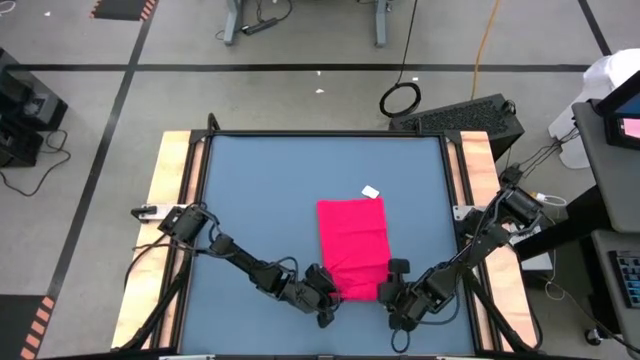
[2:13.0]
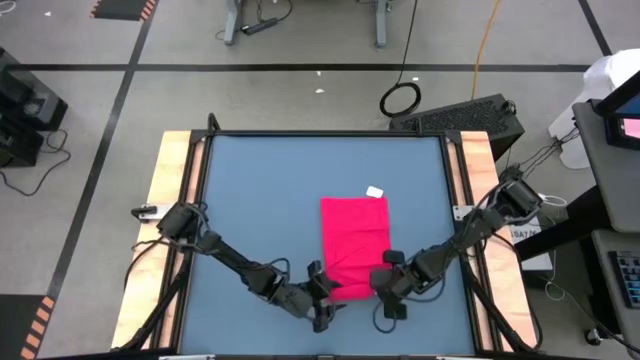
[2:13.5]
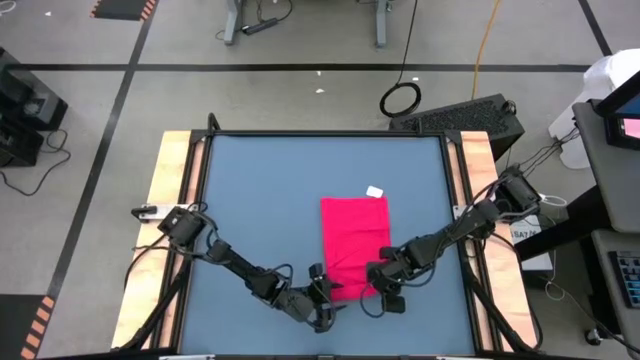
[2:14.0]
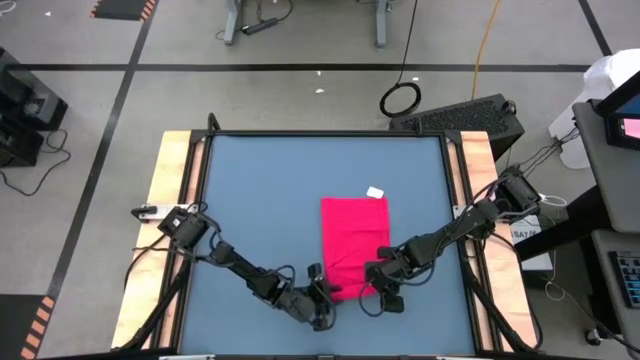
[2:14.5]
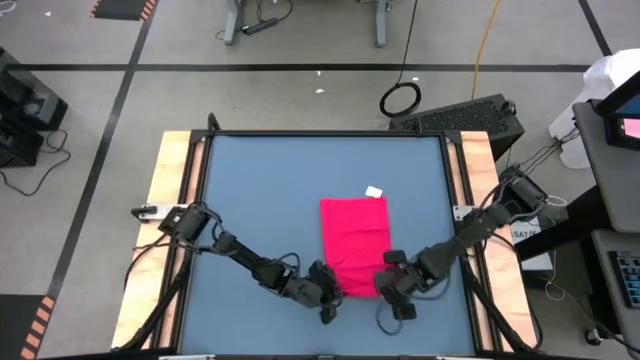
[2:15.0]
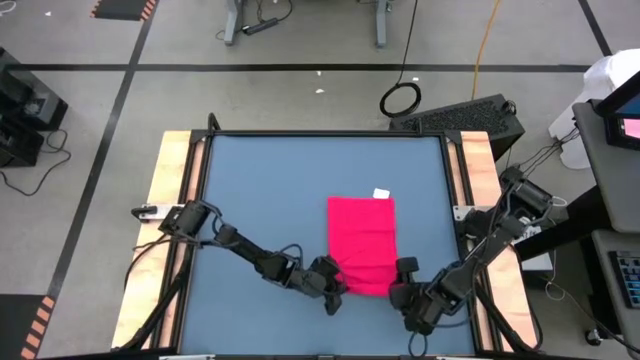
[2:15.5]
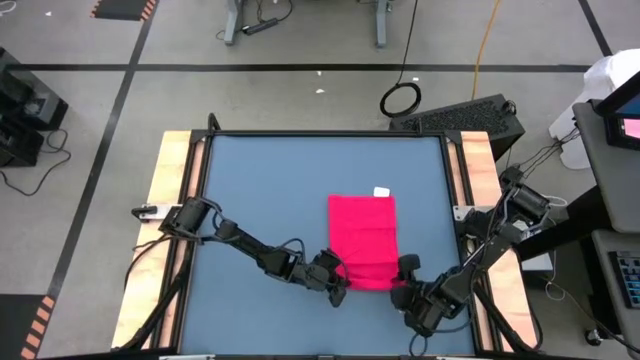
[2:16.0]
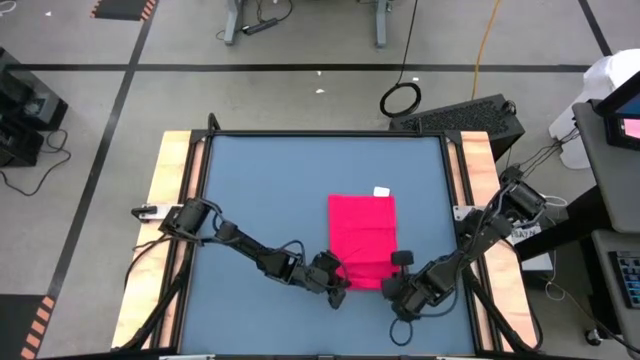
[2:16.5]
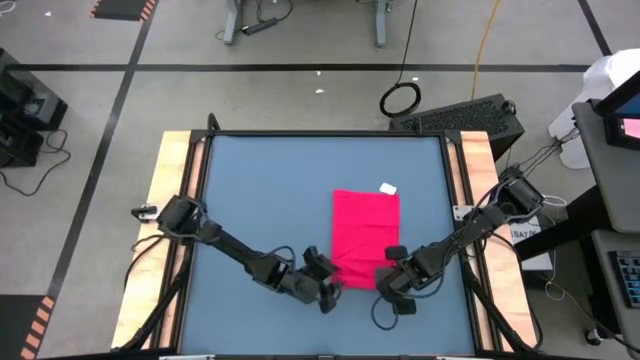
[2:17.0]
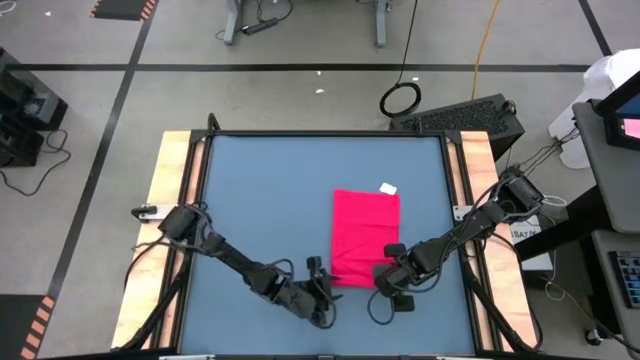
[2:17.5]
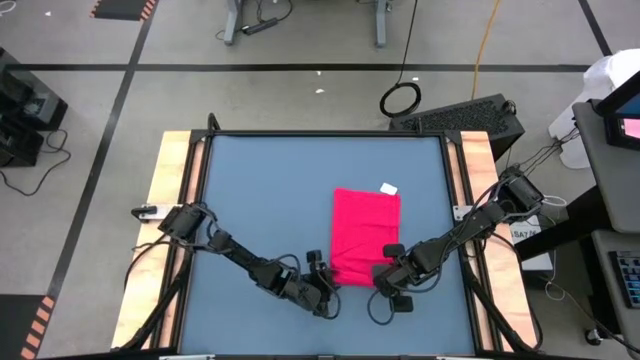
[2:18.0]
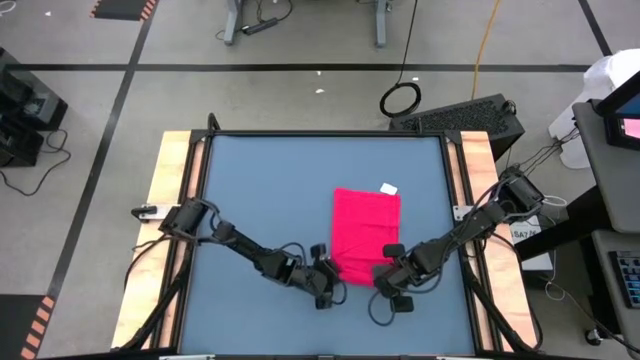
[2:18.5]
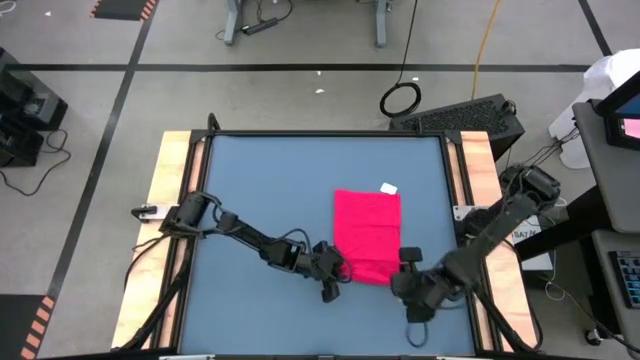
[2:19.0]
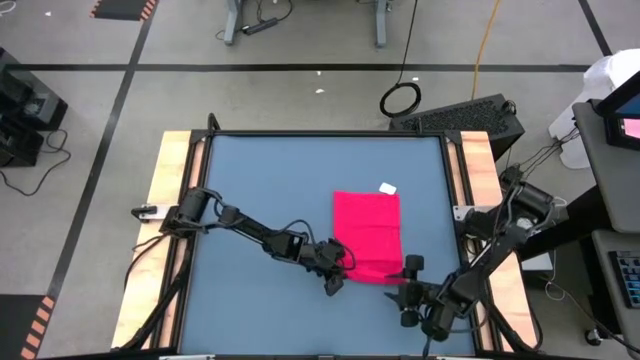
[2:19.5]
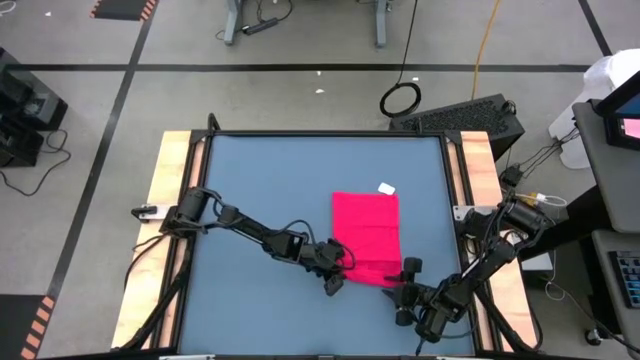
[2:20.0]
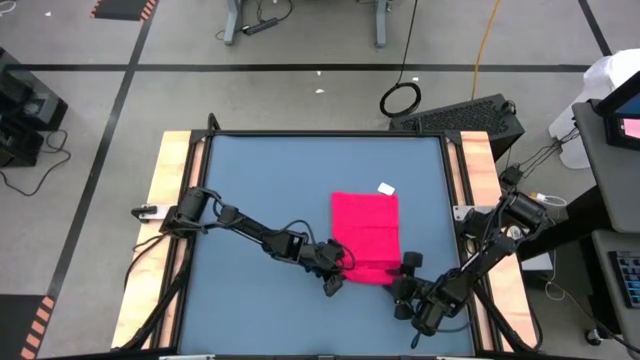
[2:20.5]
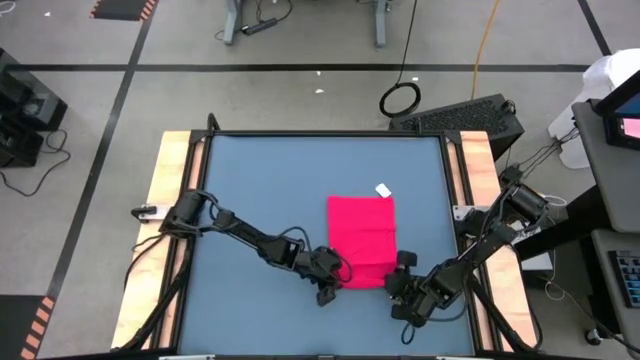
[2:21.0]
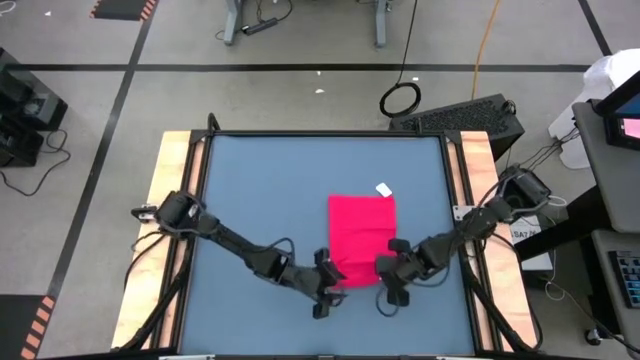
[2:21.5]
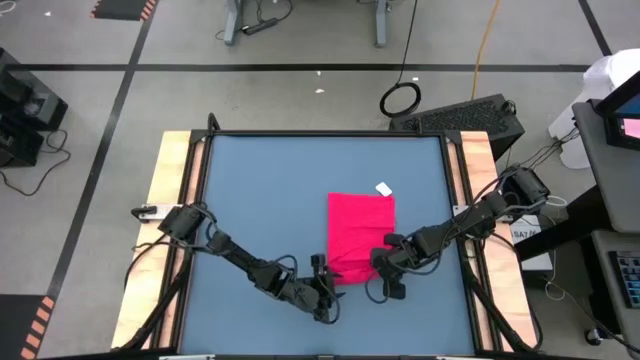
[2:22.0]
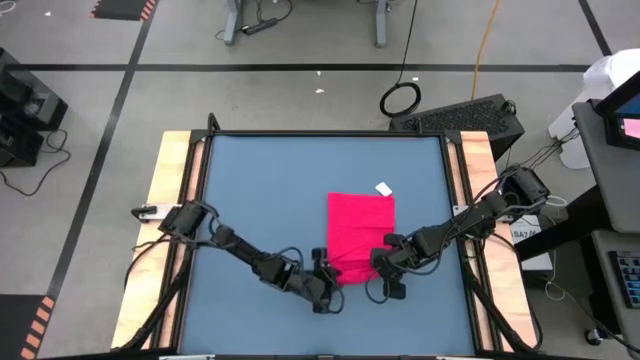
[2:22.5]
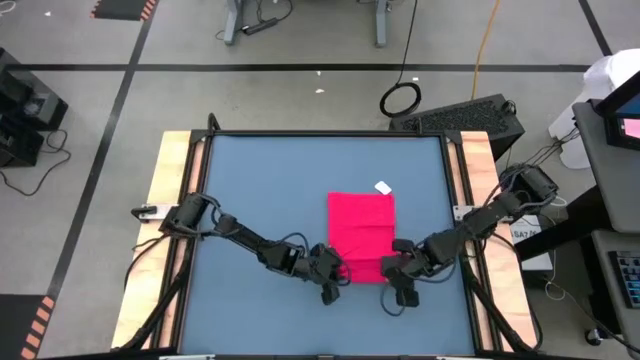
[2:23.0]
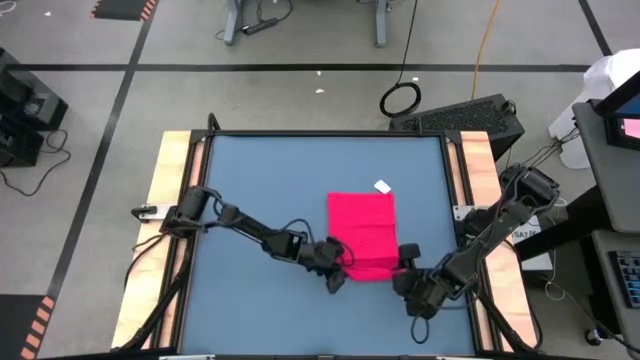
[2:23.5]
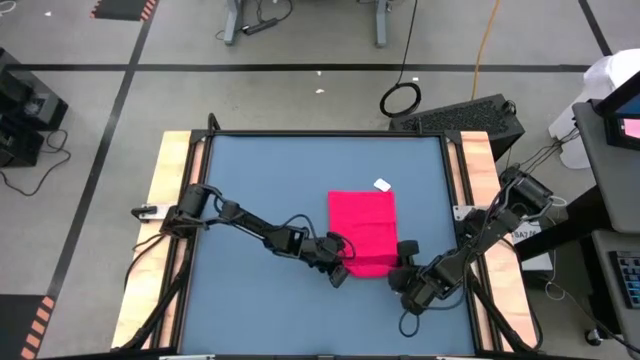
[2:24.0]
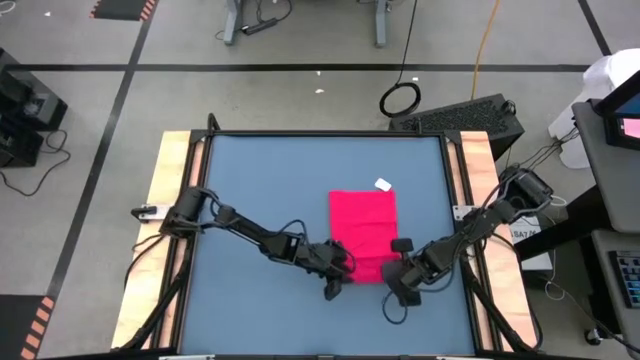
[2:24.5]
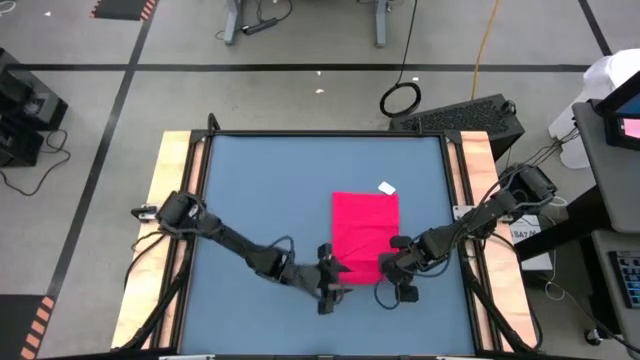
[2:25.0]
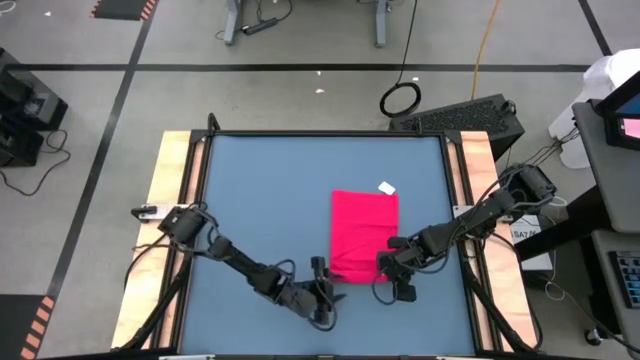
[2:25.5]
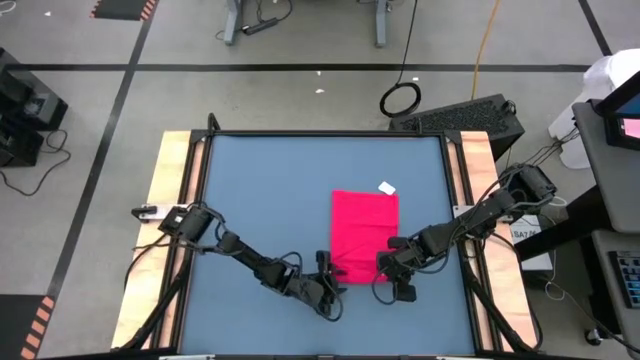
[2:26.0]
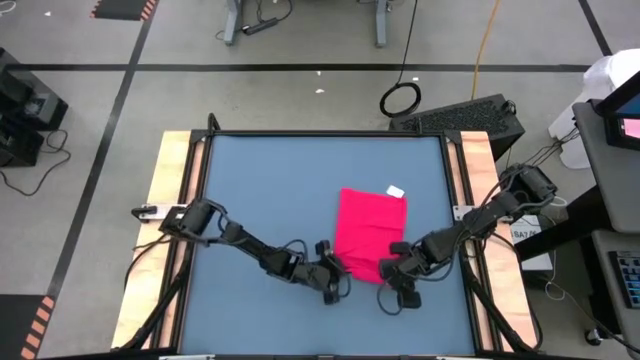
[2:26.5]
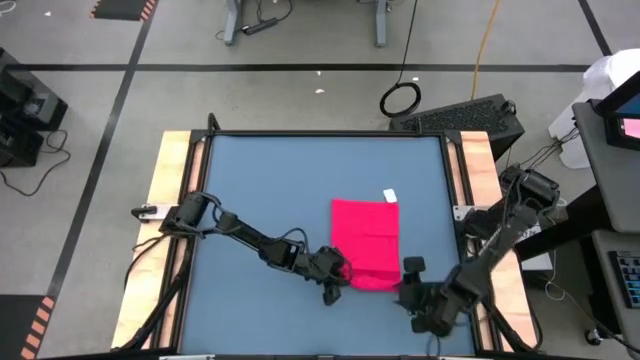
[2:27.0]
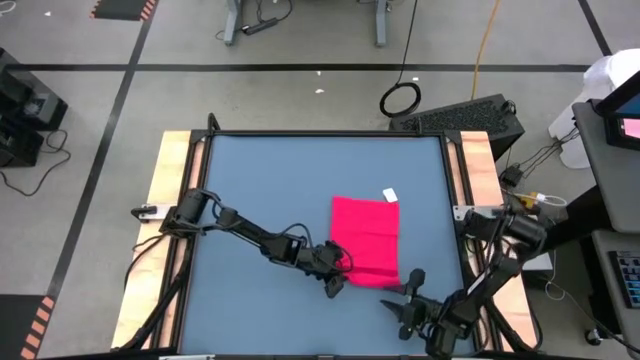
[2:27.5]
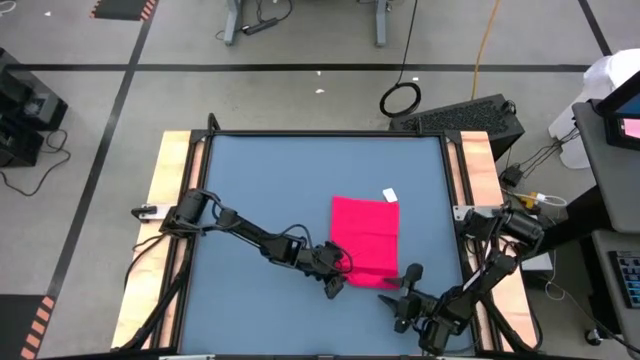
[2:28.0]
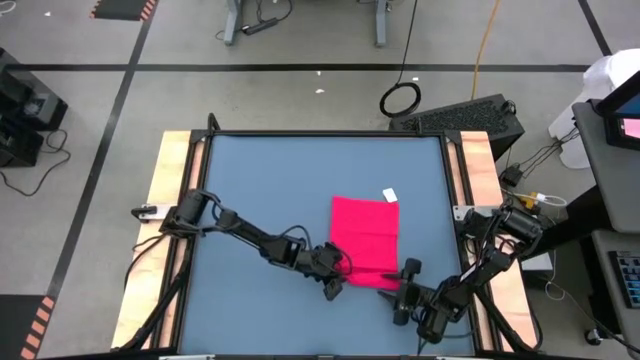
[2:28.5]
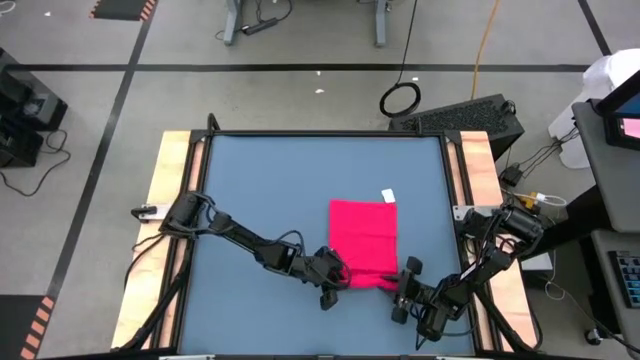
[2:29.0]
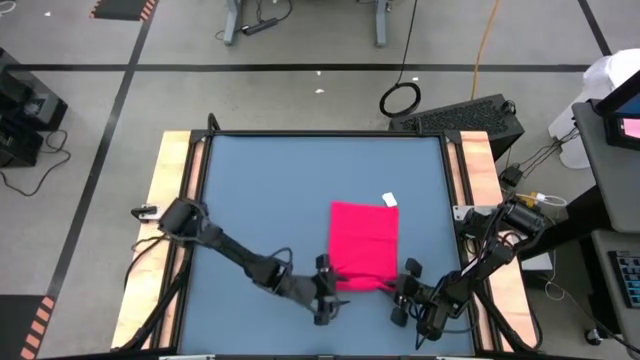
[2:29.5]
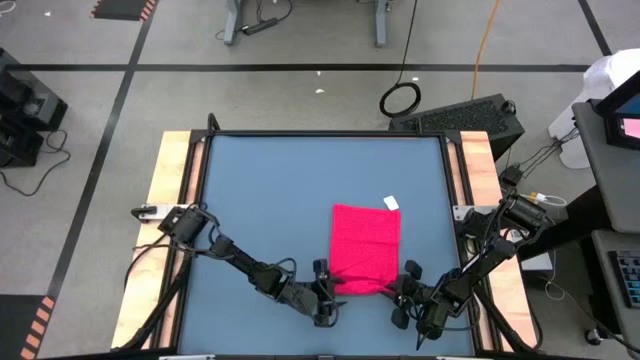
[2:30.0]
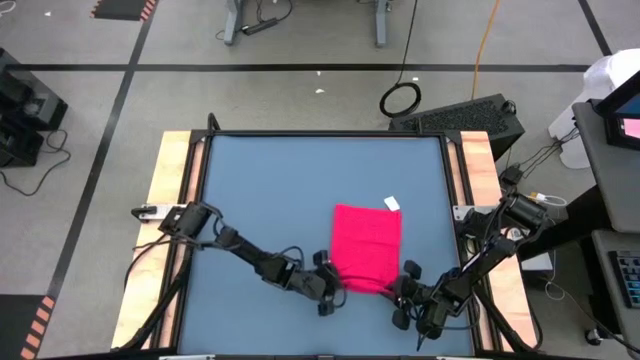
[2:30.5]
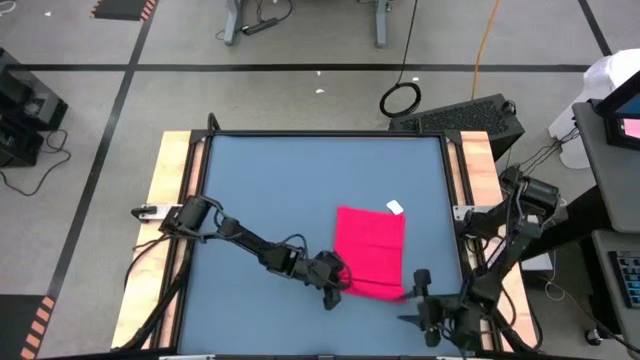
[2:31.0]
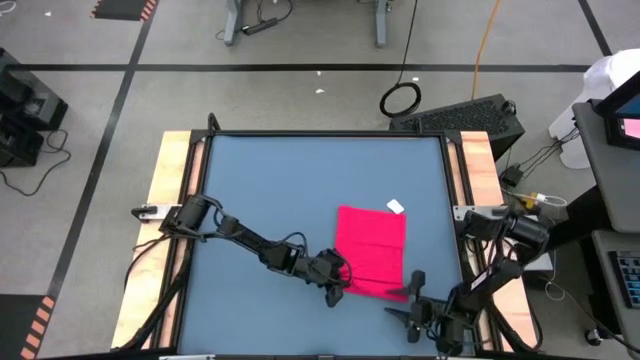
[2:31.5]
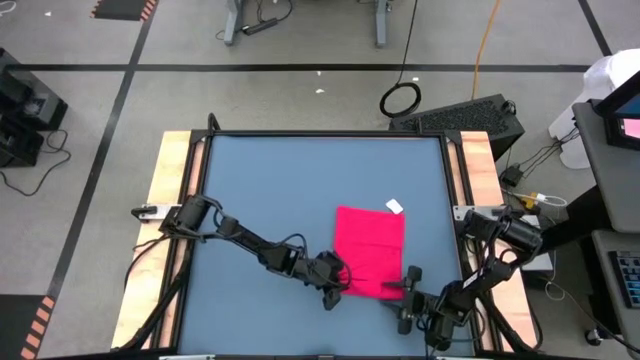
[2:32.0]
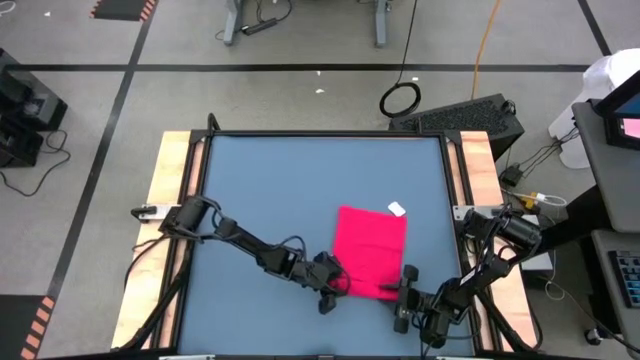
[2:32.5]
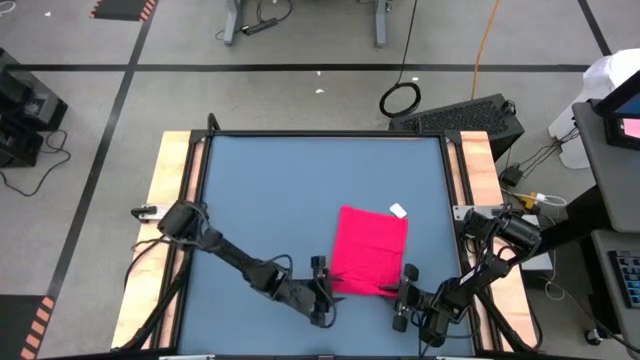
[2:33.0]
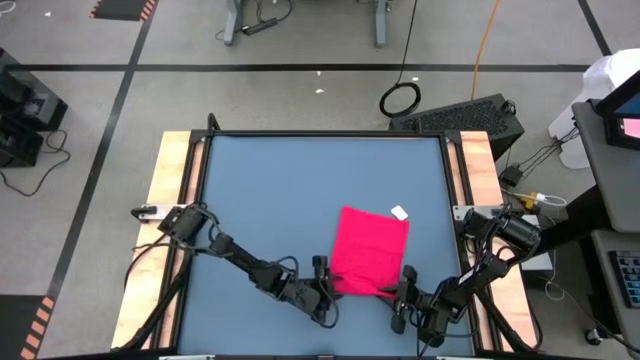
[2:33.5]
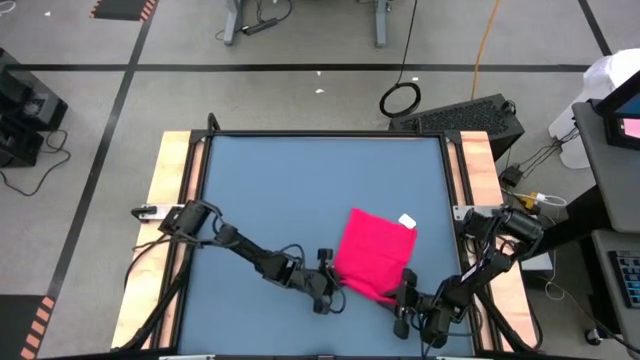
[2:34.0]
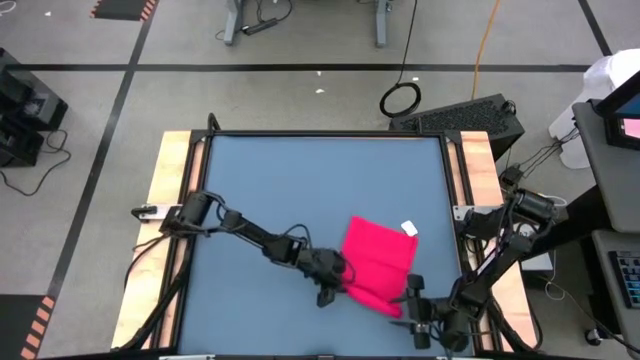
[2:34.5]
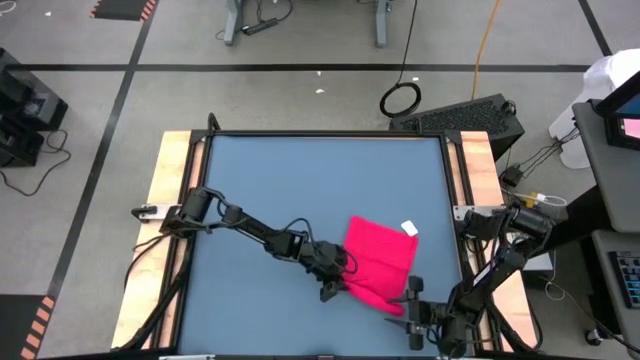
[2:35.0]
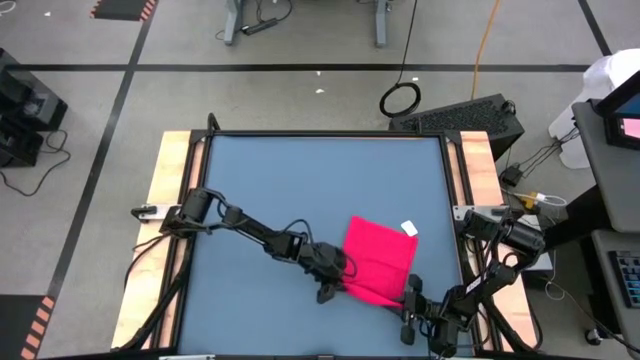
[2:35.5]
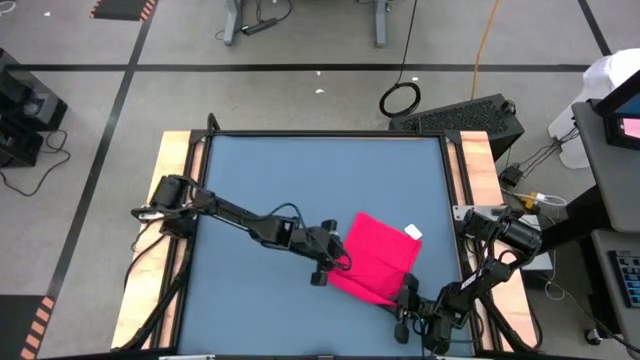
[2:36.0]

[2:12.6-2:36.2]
Task: Roll towel
Roll the red towel
